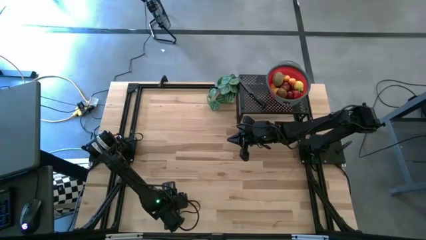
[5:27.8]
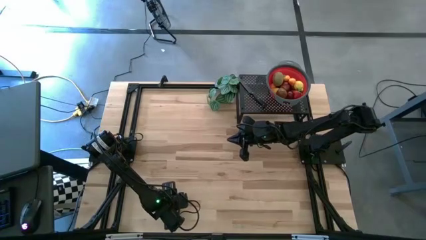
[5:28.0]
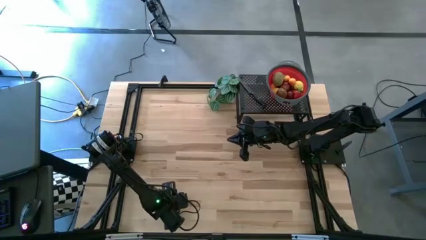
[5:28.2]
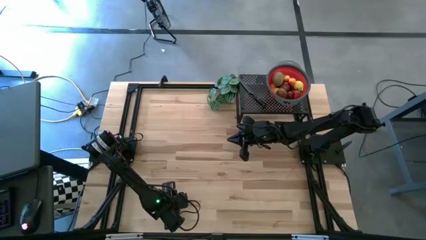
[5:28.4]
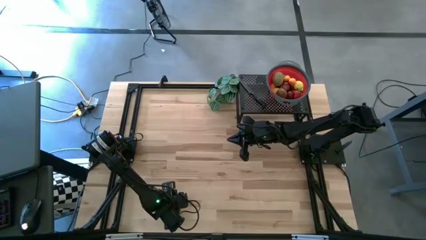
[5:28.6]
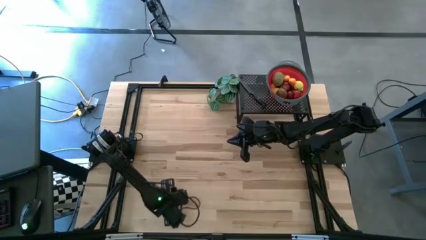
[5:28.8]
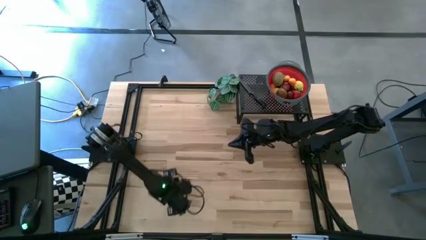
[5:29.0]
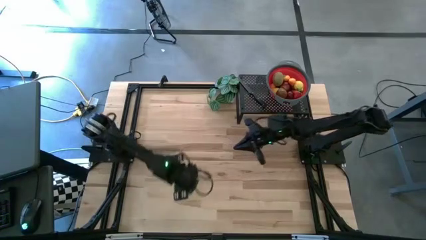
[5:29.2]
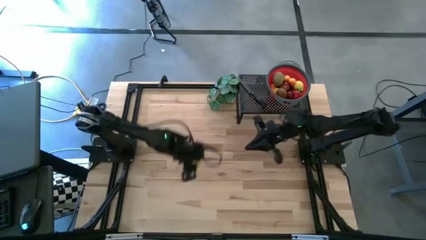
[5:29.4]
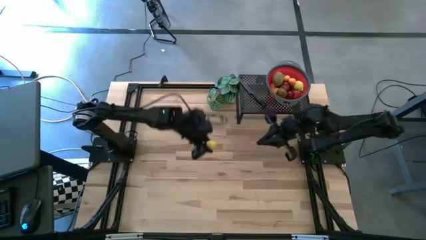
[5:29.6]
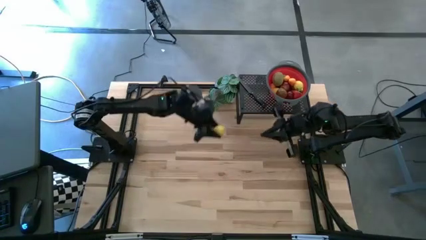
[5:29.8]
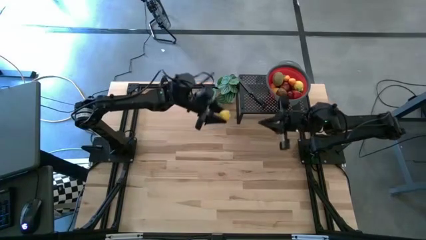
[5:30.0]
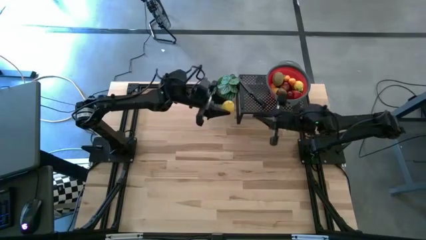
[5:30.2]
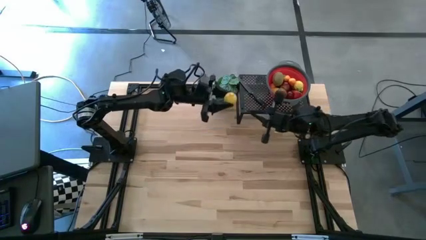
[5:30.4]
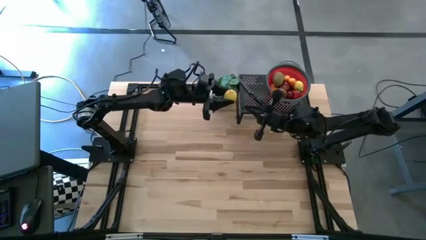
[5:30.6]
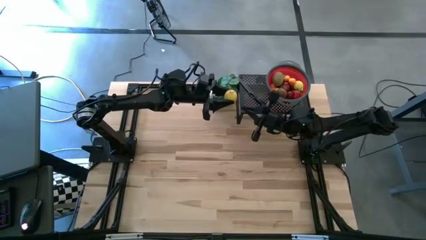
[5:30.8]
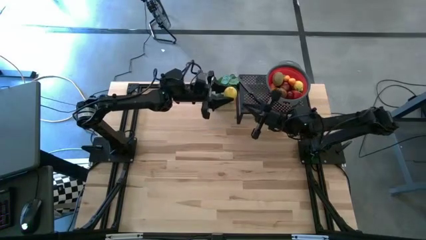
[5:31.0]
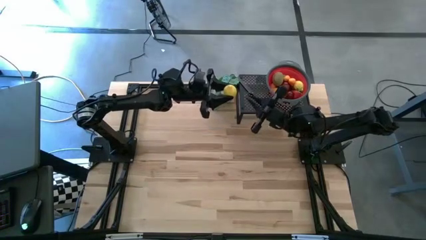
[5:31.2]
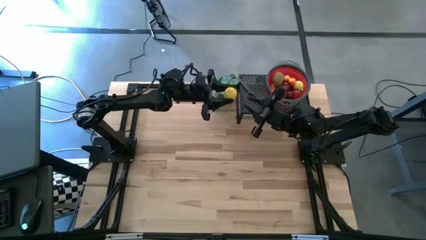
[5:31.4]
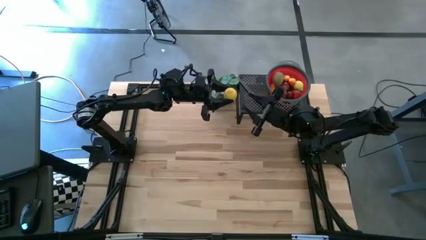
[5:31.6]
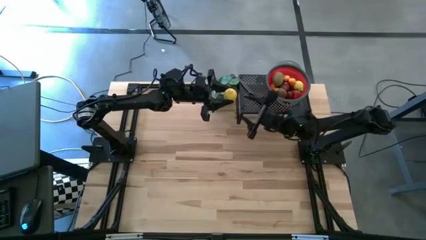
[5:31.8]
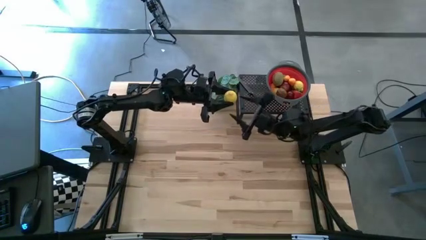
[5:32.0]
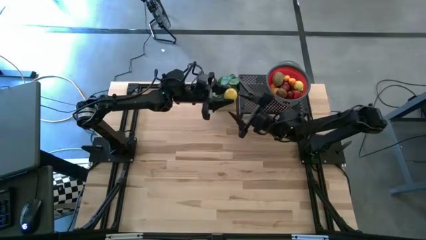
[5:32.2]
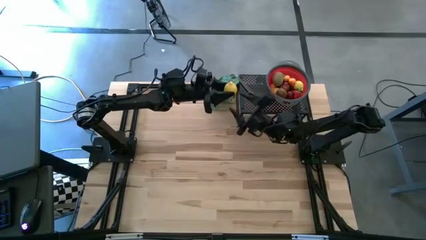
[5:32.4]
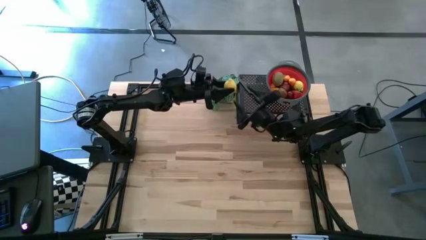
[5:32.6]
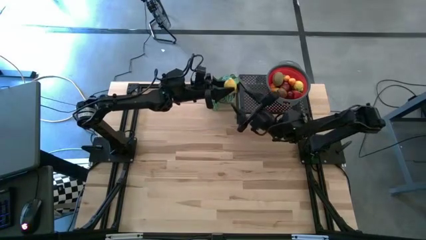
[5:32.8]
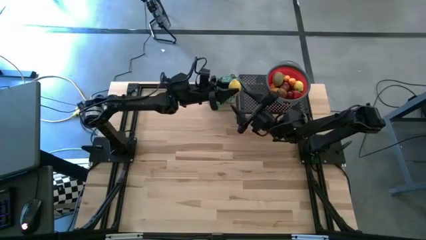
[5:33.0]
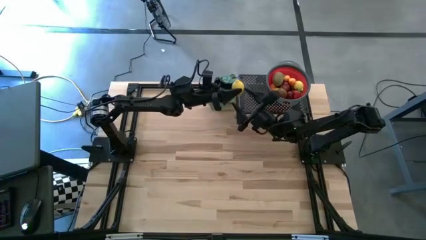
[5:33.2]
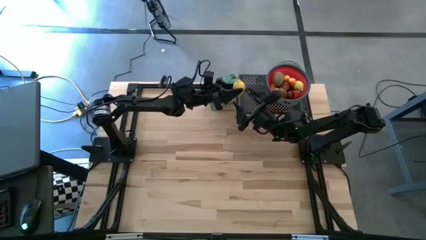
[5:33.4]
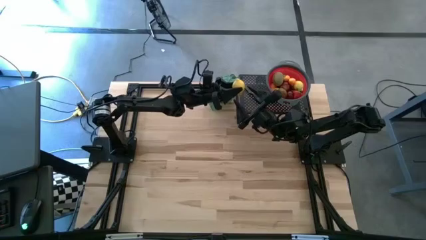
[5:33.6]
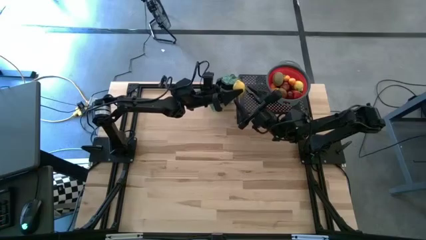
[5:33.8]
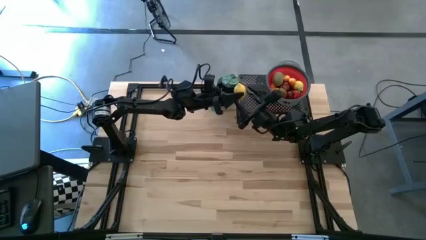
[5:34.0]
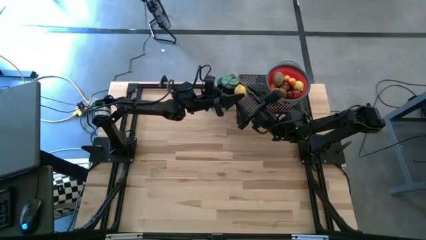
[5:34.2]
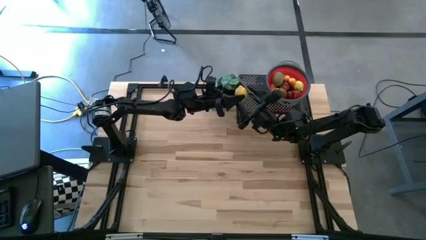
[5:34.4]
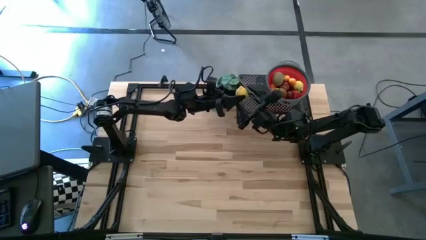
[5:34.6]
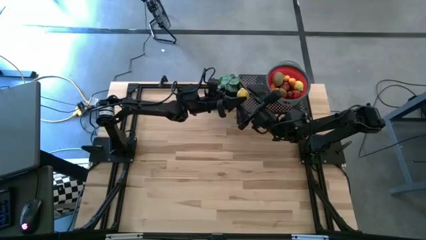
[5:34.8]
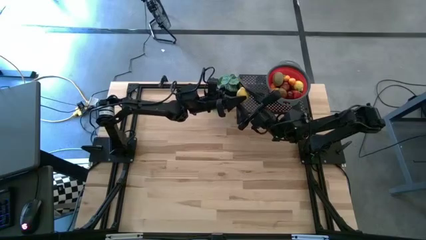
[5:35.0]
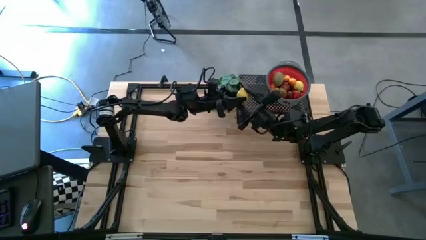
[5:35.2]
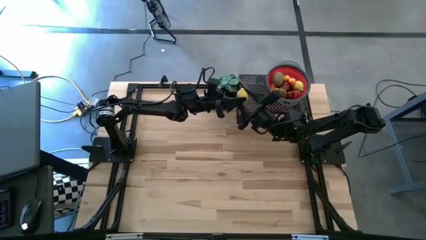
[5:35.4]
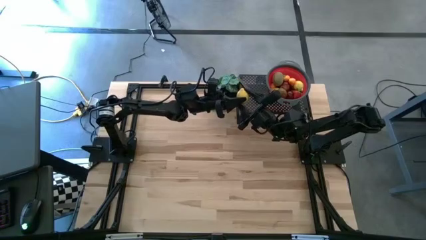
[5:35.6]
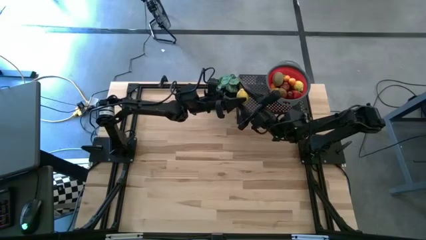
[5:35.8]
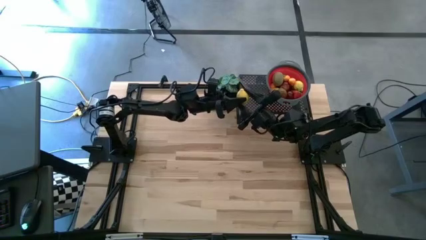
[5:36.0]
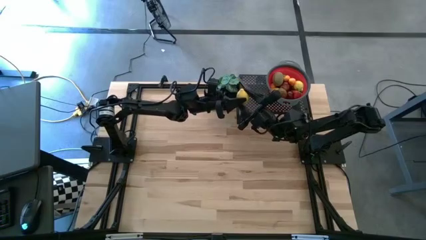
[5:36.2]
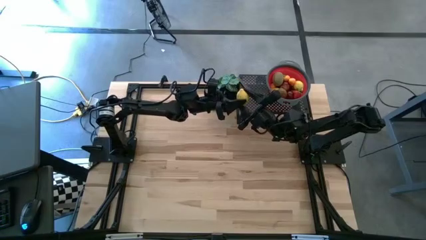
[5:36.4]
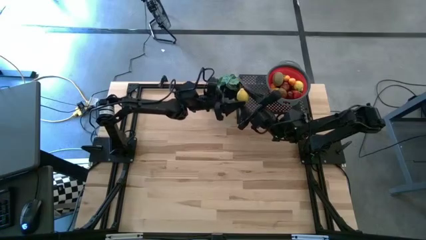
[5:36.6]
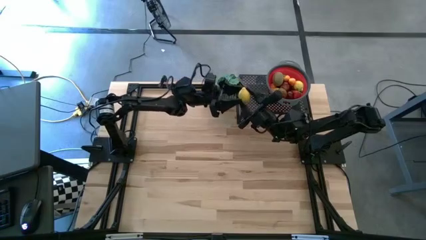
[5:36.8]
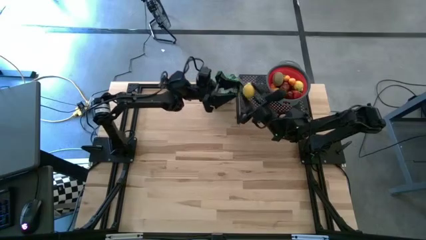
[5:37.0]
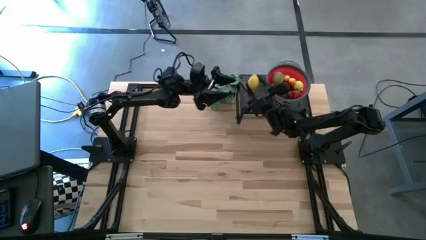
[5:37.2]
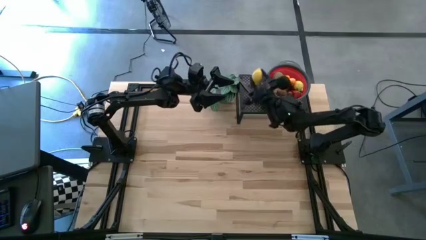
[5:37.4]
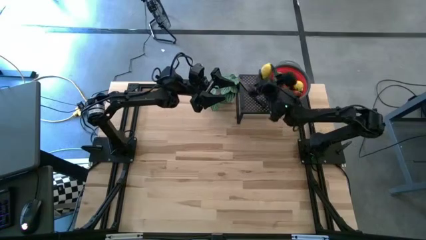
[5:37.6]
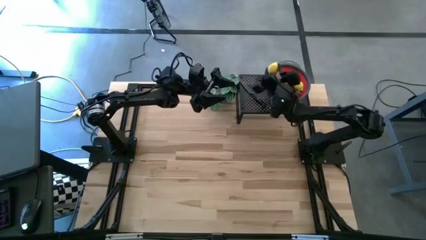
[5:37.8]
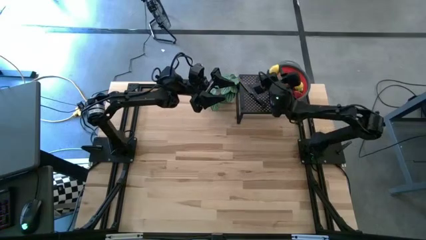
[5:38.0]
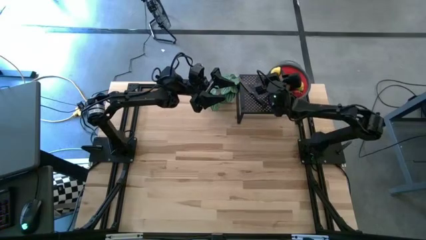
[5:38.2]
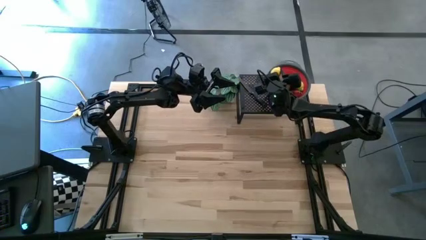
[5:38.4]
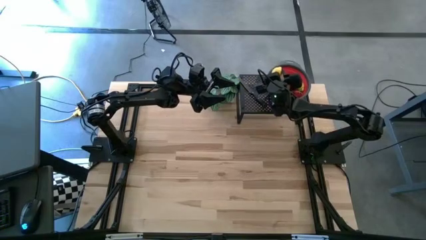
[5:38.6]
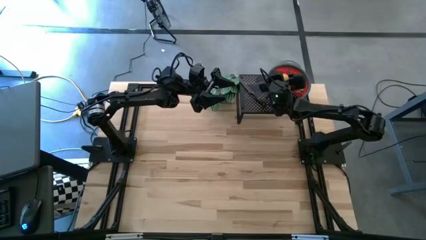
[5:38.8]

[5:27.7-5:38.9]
Task: Pick & Place Fruit
Put the yellow lemon into the red strainer bowl

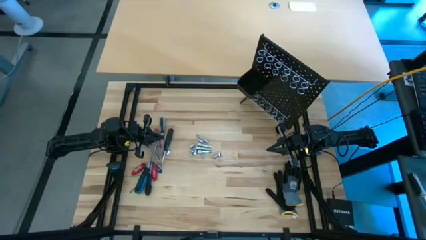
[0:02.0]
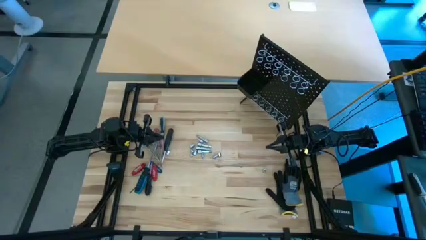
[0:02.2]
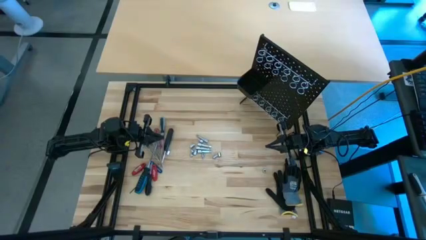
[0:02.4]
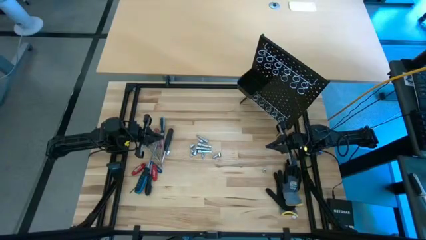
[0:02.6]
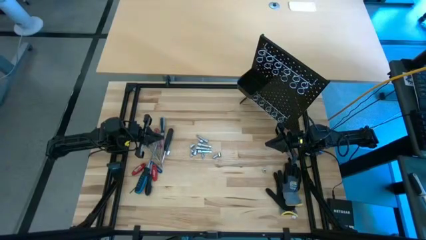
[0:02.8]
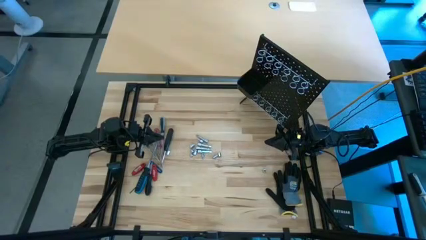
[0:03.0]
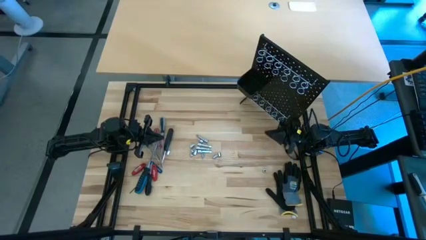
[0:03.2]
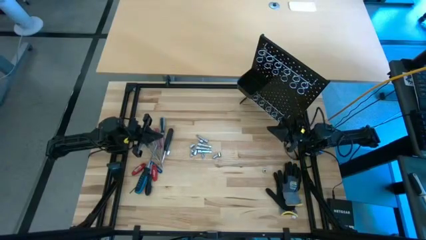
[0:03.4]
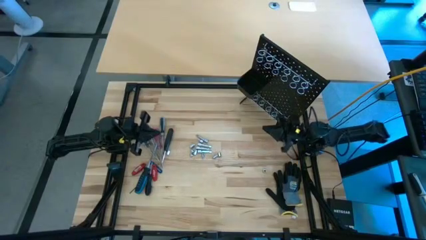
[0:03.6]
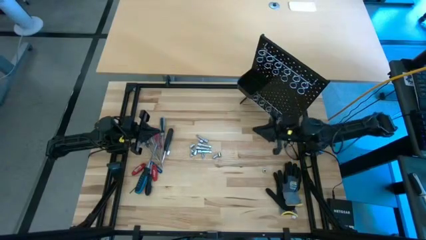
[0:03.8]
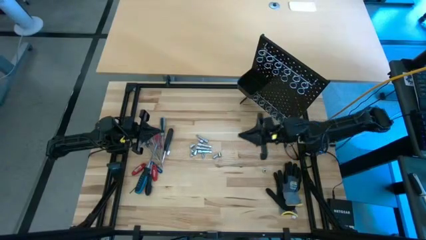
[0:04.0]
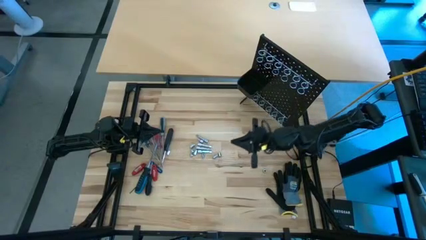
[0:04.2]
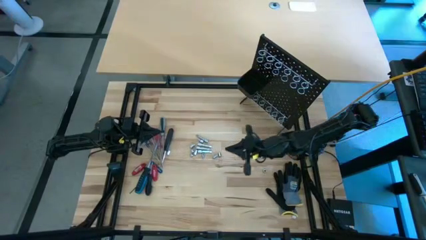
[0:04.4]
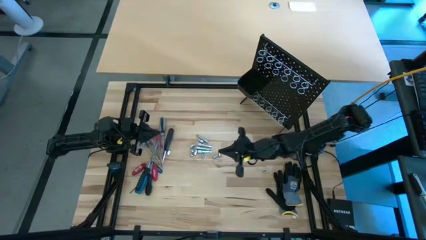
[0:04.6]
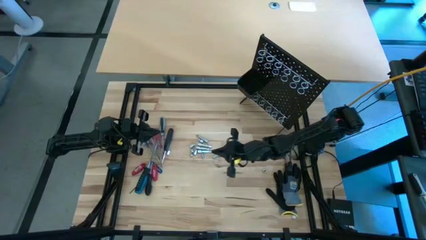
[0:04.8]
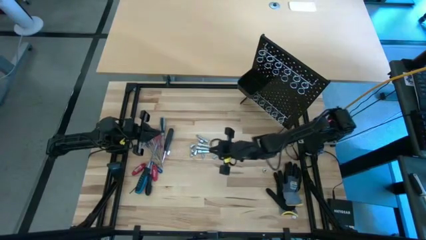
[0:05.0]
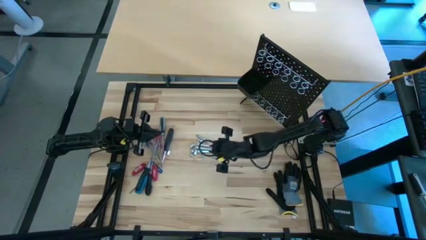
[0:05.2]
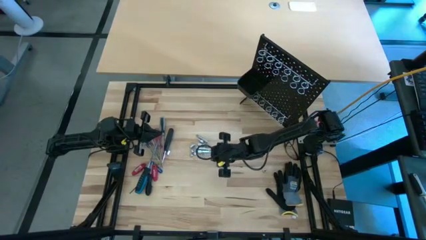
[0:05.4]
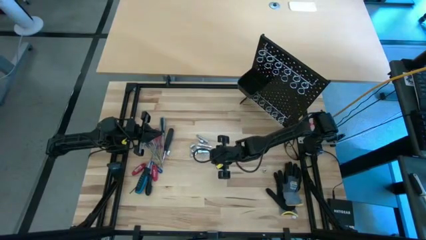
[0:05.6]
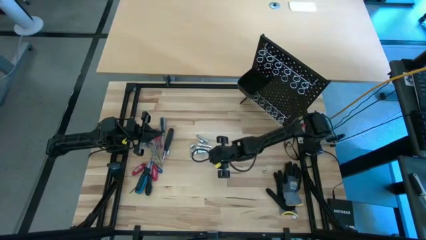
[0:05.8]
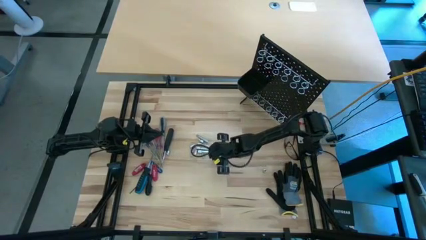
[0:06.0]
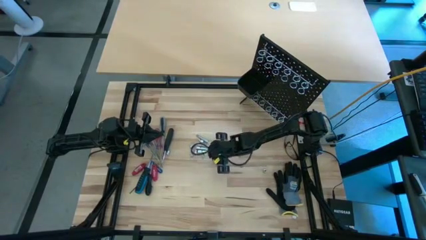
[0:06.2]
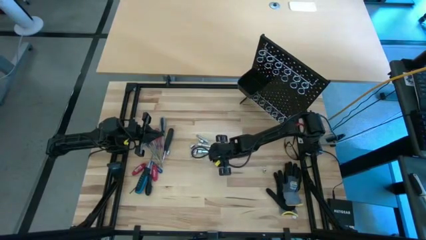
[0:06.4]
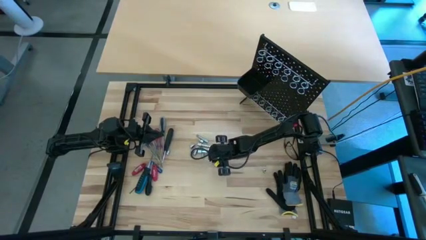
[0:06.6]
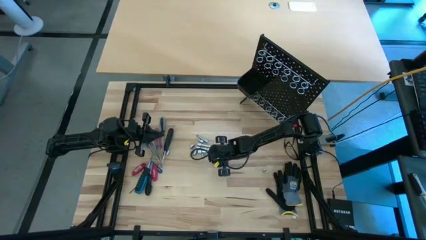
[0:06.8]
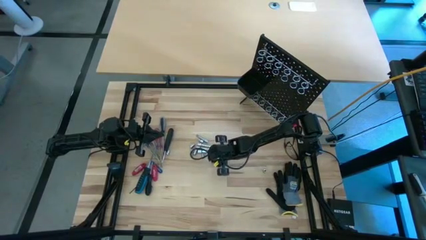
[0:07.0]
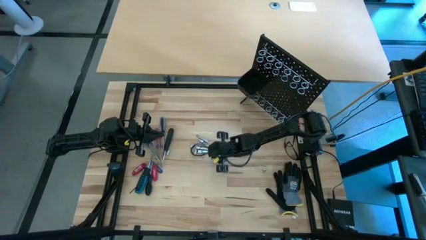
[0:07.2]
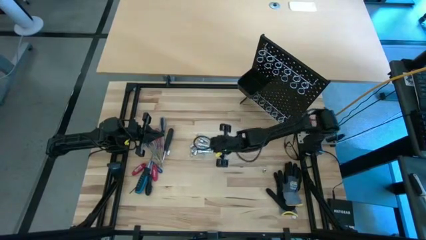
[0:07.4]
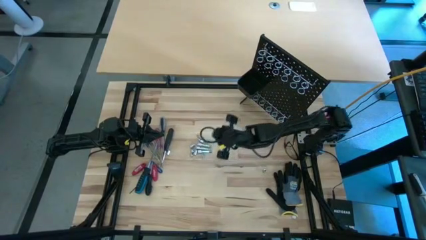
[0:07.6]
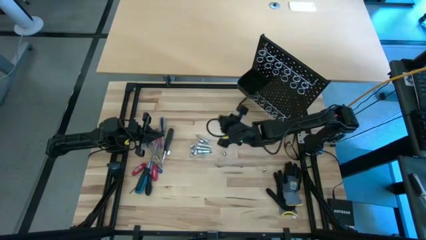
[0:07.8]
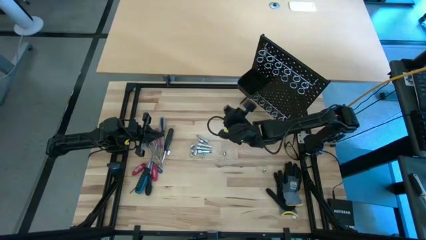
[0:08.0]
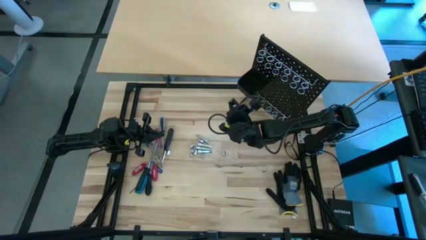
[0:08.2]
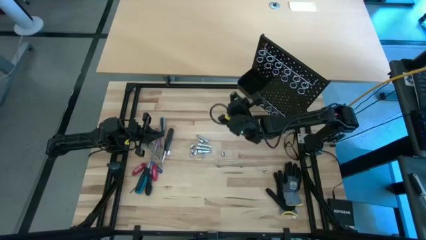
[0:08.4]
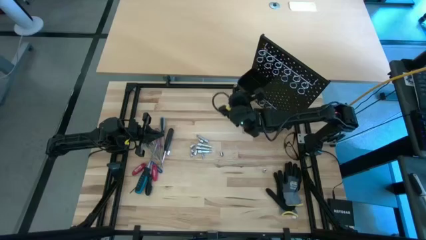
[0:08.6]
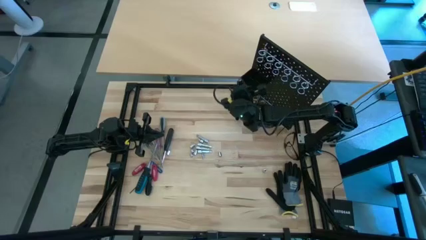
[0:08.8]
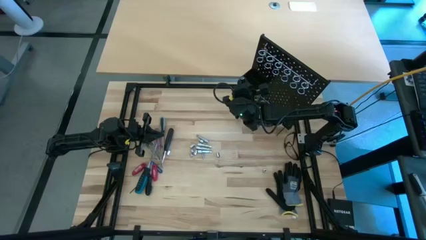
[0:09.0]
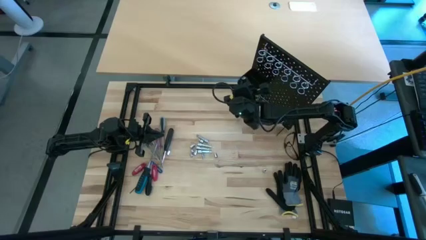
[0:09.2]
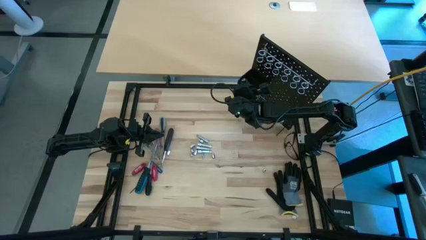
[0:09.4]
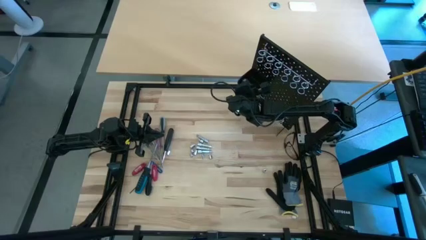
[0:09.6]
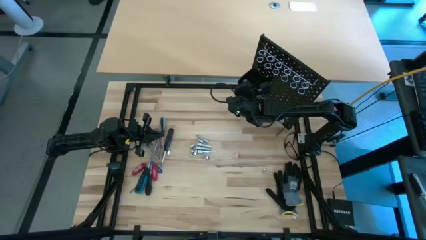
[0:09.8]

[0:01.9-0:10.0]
Task: Hang tools onto peg board
Put the socket into the black pegboard bin
